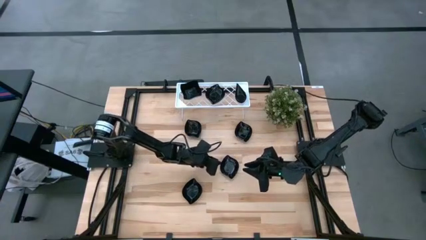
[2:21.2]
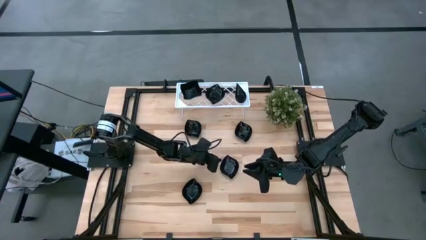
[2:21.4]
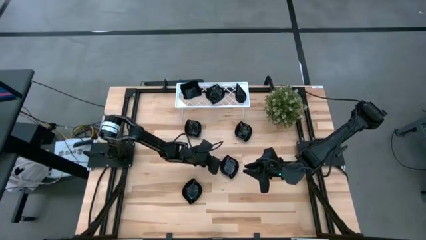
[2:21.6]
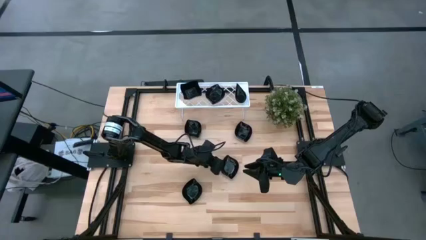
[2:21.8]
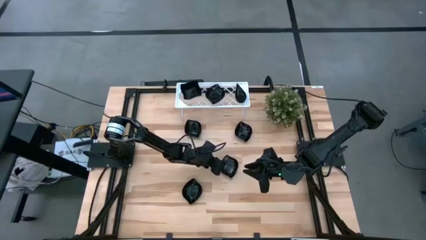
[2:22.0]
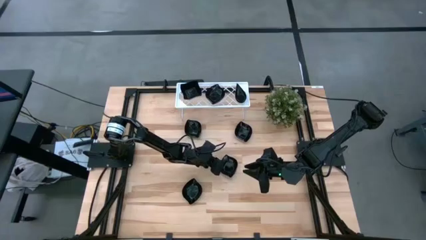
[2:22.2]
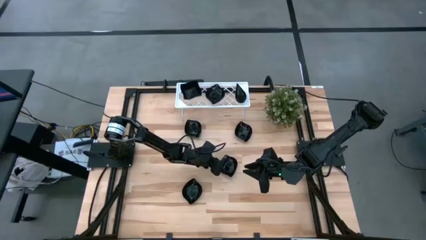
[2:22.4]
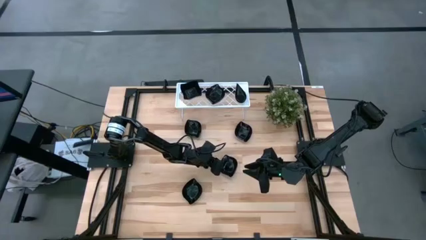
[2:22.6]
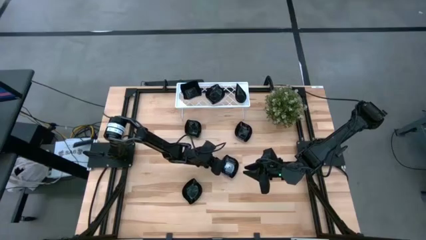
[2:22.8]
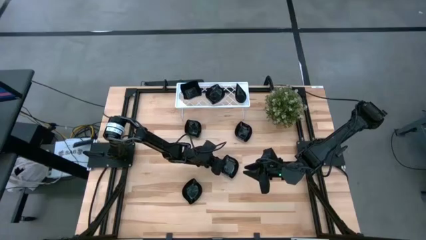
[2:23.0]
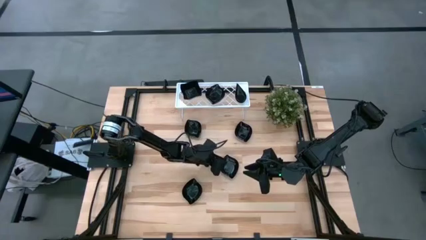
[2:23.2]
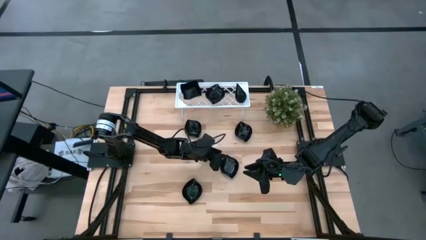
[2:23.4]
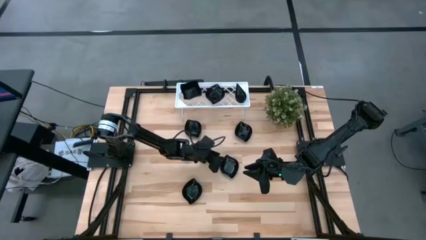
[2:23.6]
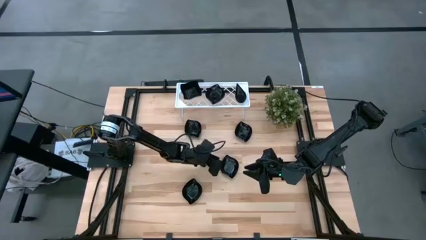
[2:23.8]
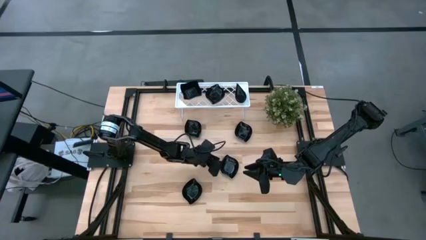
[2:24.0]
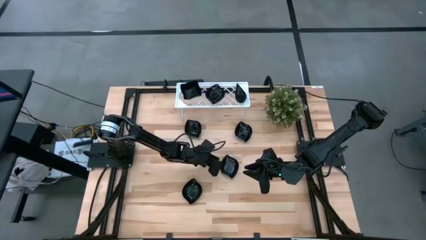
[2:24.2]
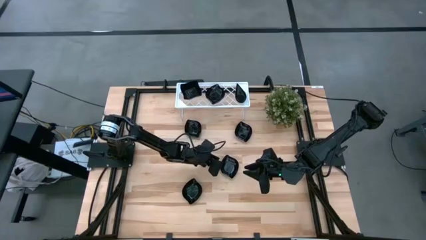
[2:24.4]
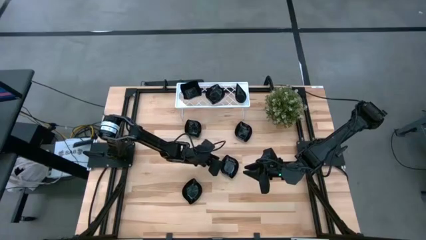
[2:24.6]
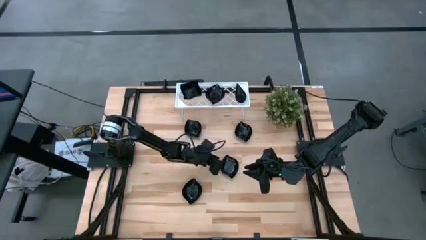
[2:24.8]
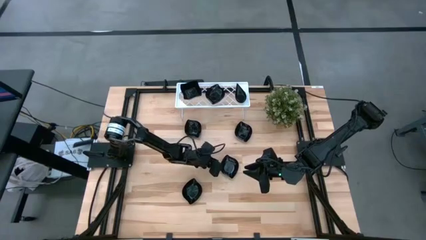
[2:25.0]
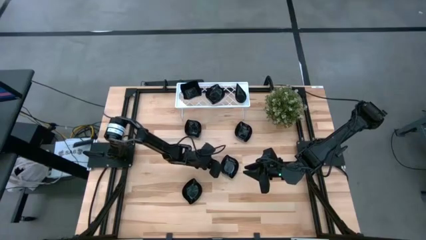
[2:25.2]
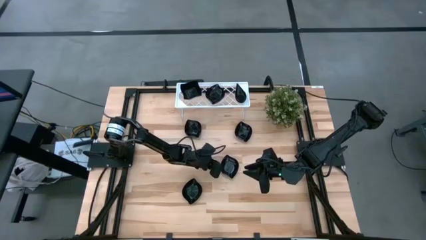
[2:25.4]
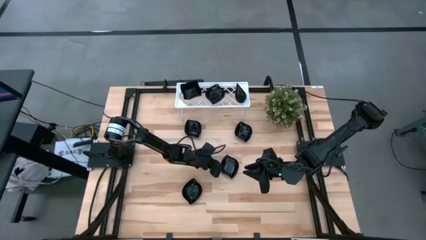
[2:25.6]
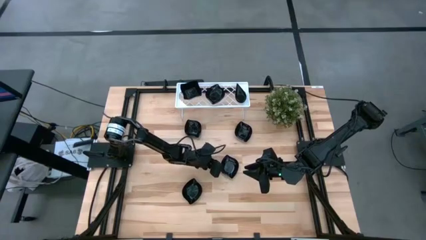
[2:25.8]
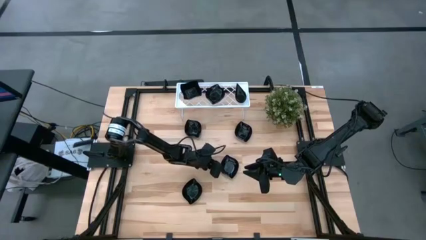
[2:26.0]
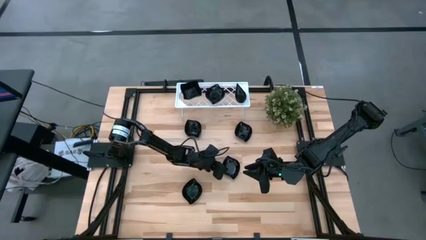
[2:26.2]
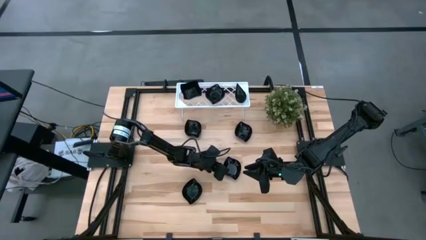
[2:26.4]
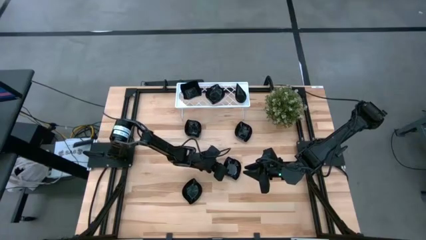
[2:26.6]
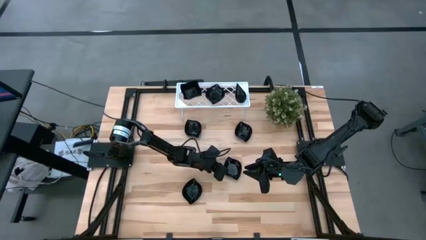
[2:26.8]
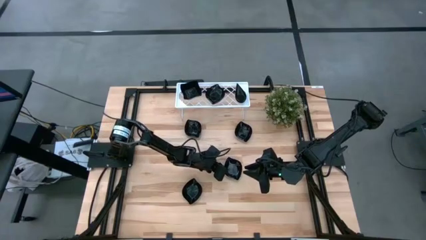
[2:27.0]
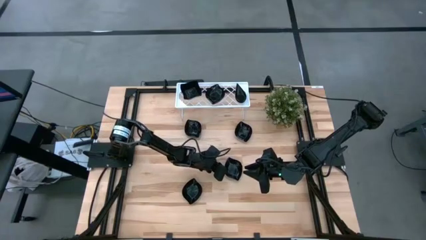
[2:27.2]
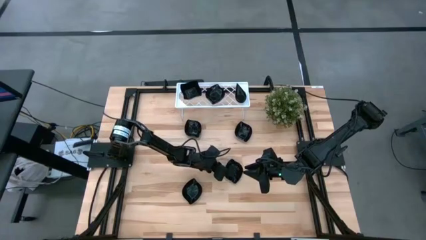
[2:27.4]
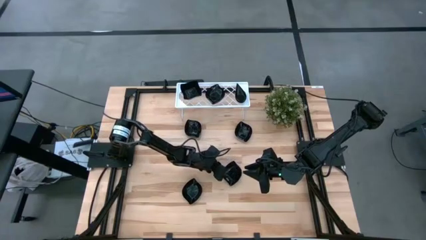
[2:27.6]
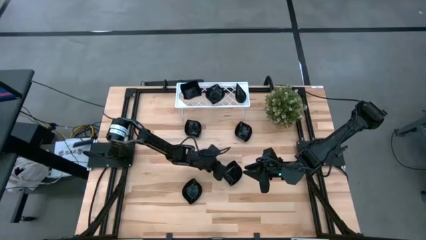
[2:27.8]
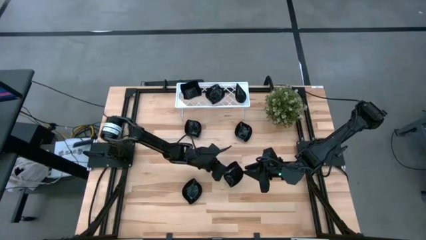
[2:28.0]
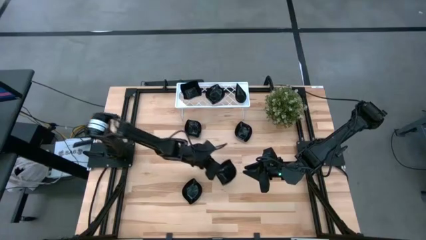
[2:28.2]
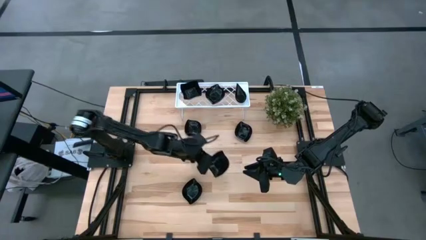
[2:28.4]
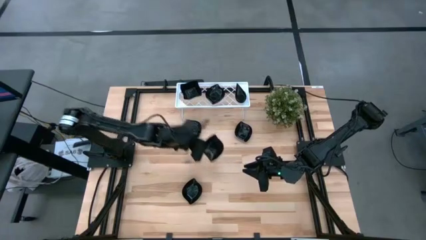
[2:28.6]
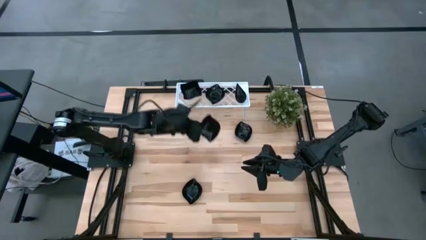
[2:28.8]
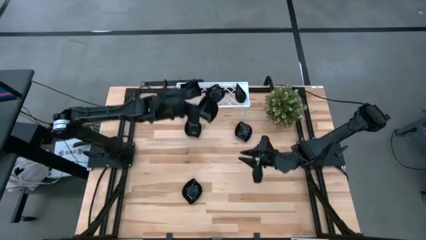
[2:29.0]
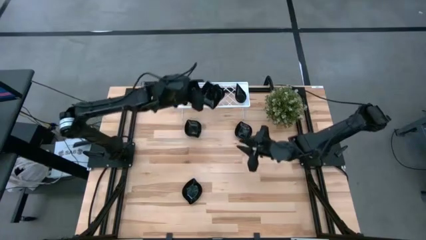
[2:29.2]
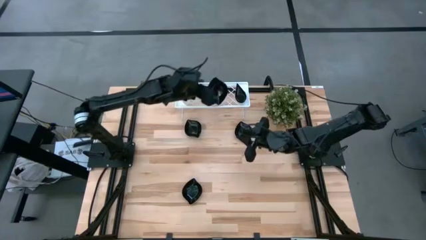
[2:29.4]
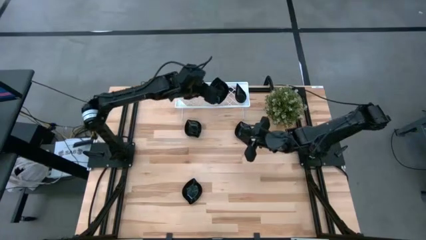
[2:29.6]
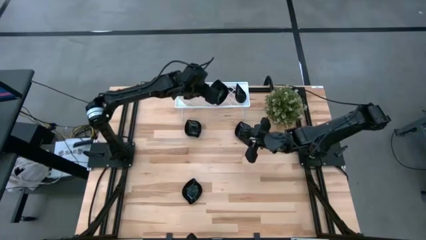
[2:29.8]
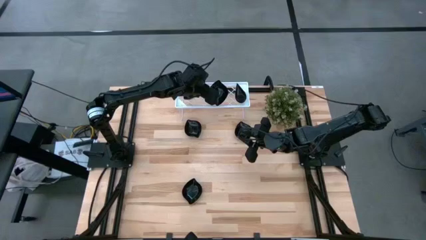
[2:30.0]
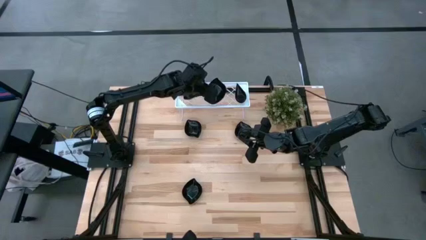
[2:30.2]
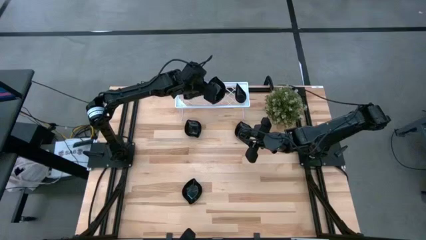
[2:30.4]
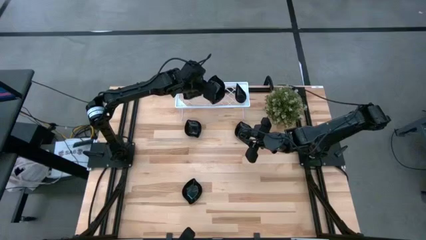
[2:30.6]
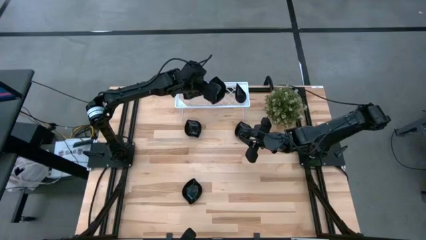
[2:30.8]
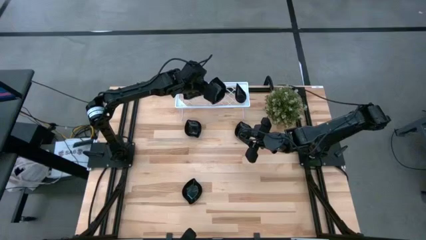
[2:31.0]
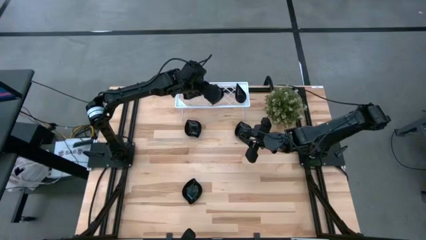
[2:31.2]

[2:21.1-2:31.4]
Task: Pick & Place Mini shaped plates
Stack the leaf-shaped plate on top of the leaf-shaped plate on the shelf

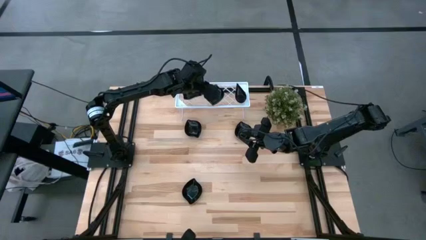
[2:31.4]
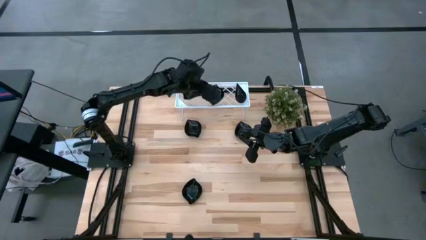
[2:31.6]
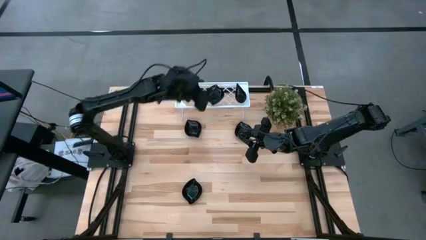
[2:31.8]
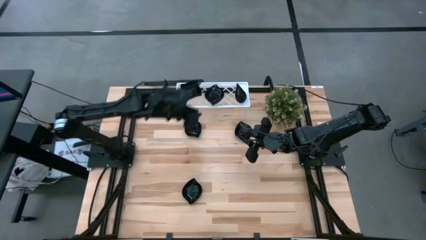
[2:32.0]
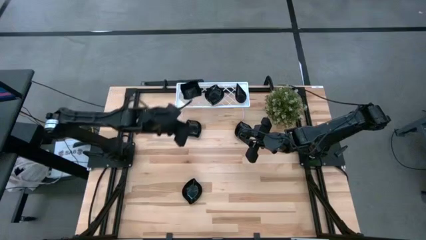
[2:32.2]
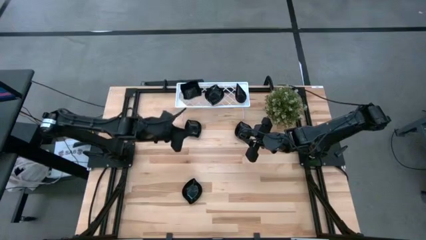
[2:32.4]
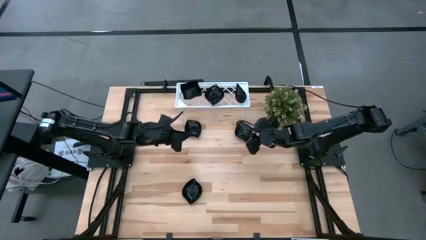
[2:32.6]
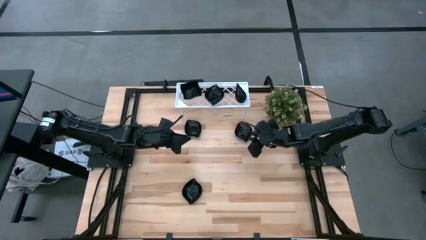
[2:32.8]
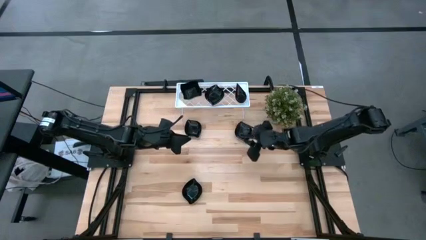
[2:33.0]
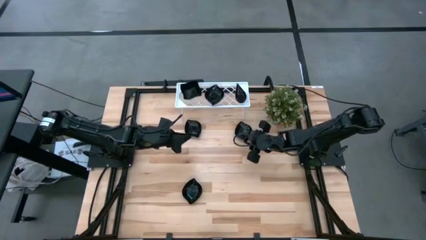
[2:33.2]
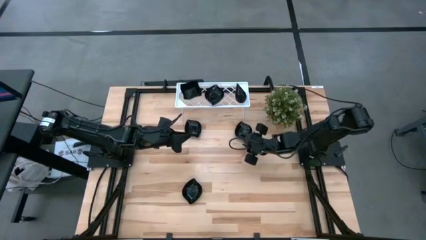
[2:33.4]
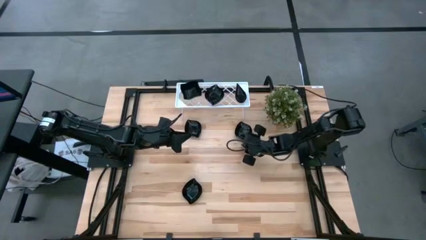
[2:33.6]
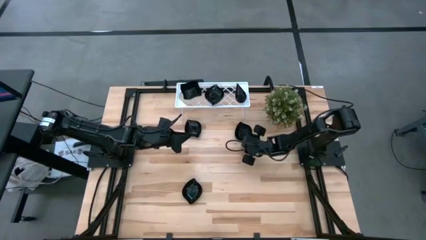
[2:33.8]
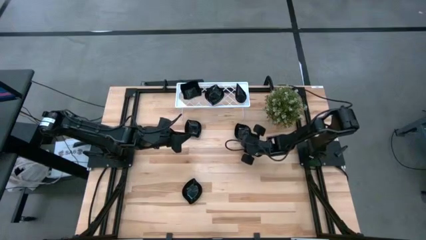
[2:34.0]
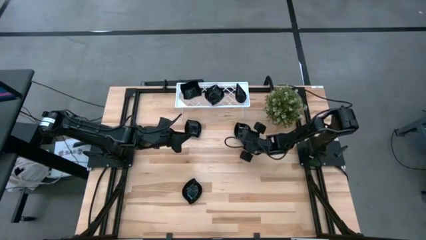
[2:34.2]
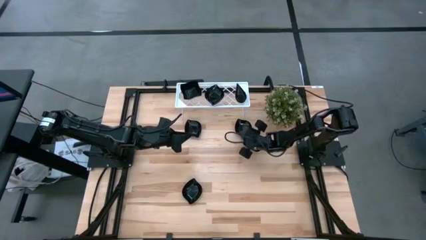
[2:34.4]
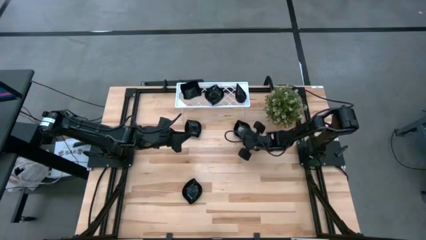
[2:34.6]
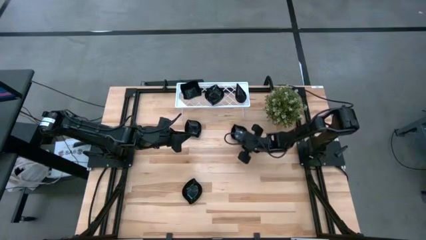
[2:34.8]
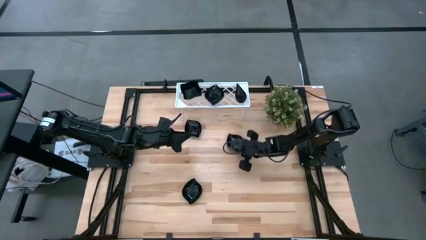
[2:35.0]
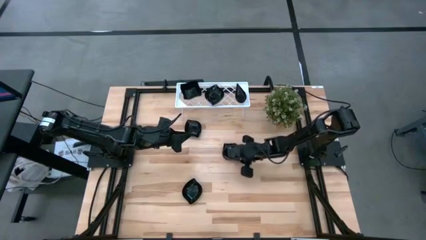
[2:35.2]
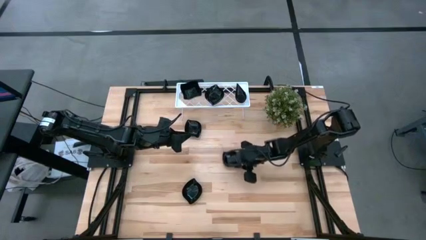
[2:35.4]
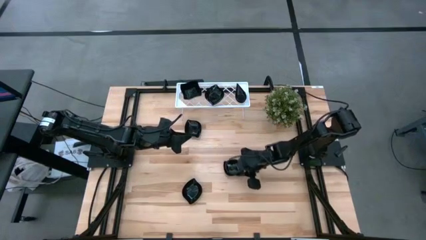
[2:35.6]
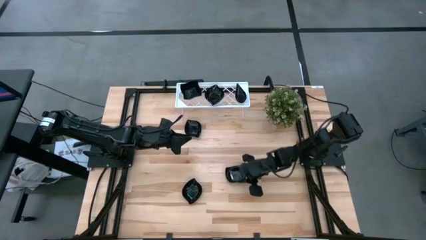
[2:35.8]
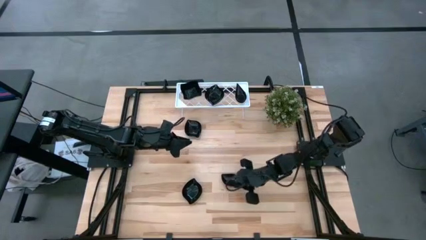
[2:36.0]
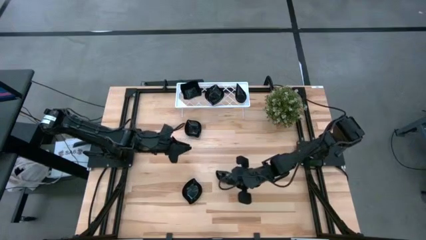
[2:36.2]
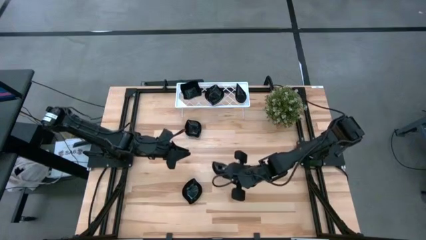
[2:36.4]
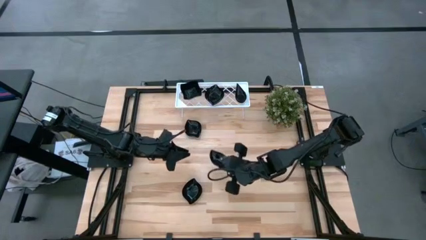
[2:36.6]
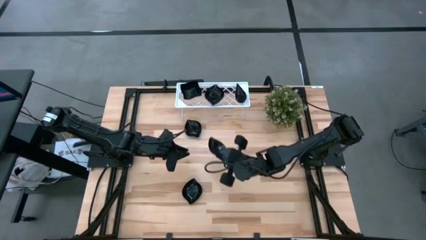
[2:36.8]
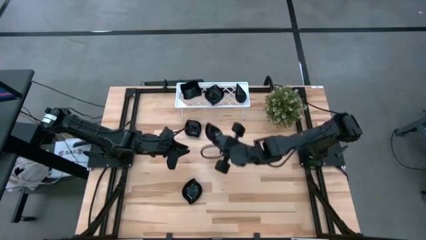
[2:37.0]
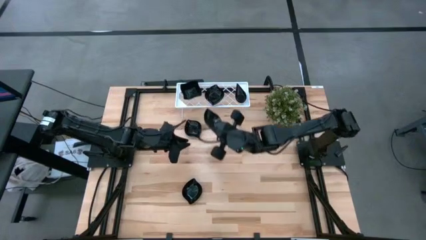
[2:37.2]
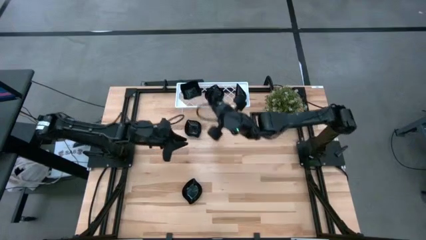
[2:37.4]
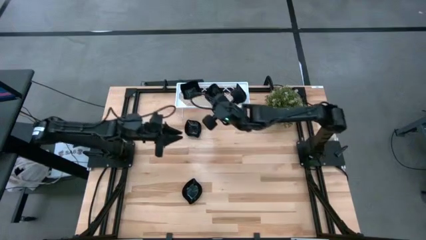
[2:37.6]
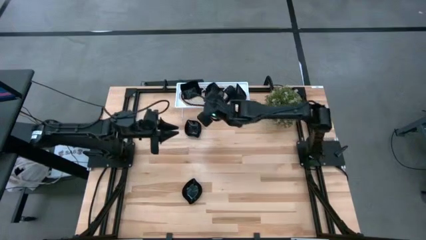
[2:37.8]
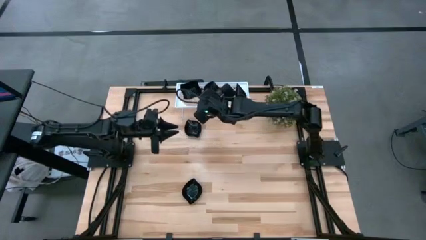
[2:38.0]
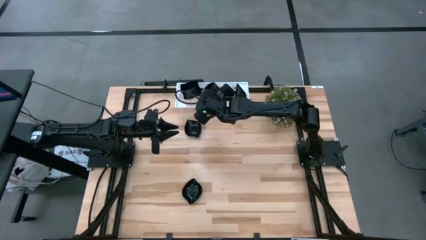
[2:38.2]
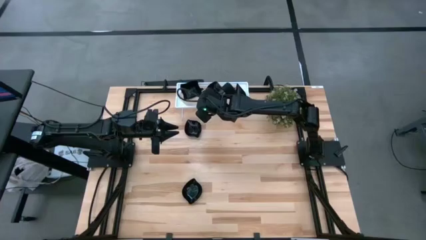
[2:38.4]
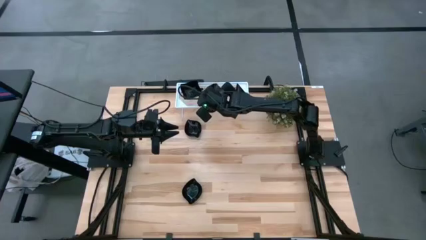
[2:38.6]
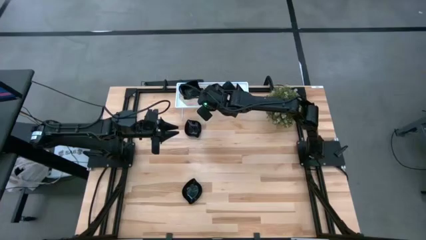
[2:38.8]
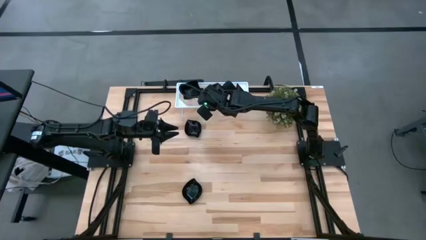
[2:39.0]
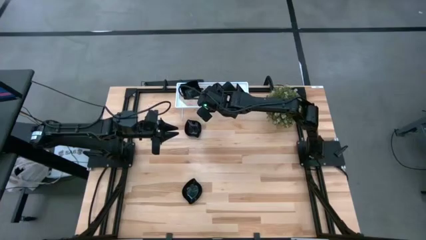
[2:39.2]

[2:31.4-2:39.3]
Stack the leaf-shaped plate on top of the leaf-shaped plate on the shelf
